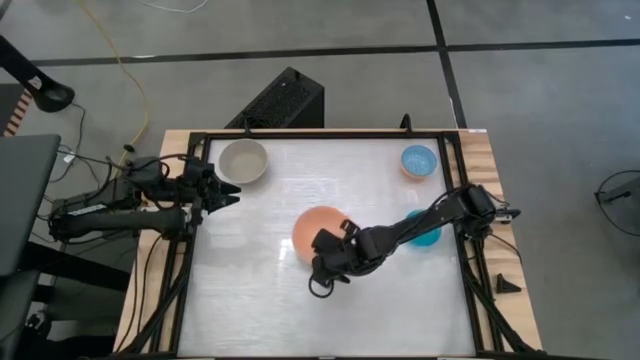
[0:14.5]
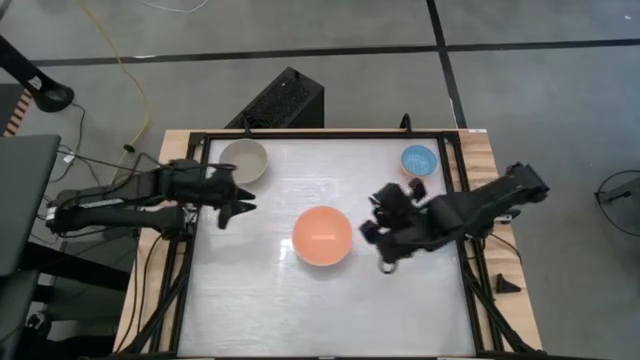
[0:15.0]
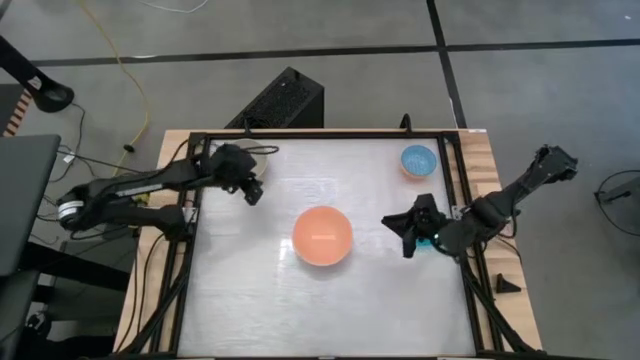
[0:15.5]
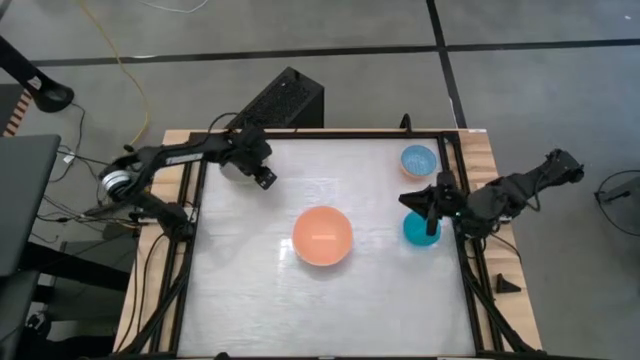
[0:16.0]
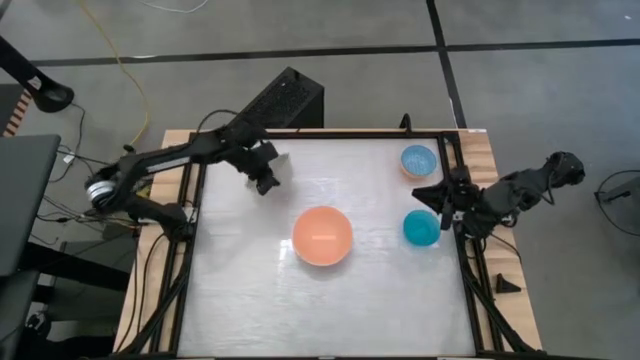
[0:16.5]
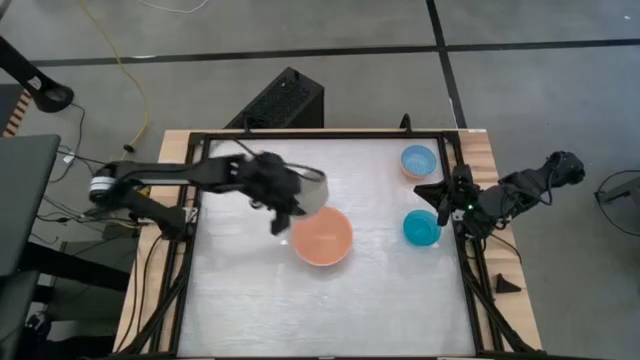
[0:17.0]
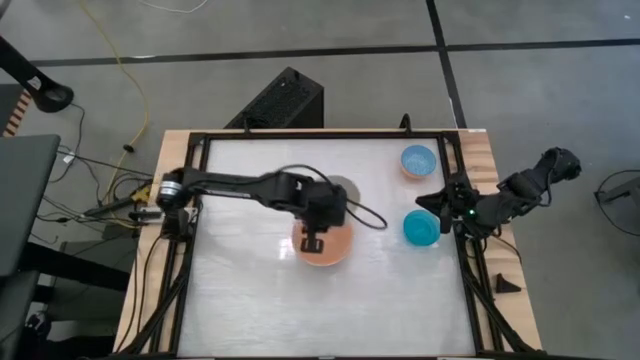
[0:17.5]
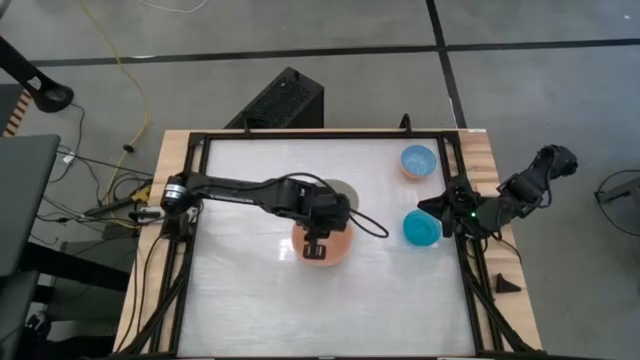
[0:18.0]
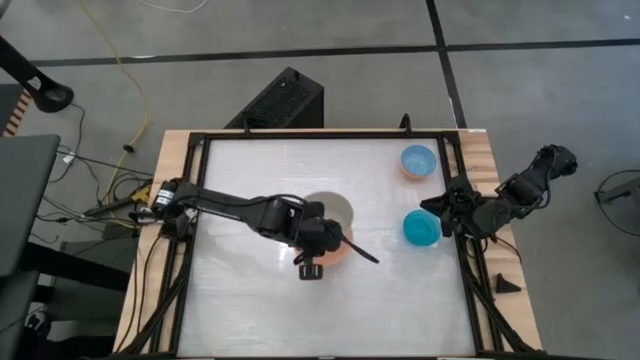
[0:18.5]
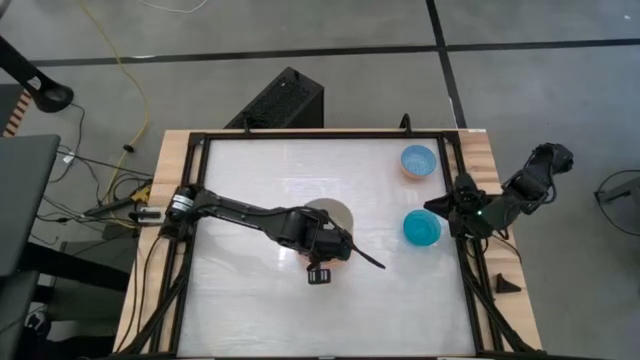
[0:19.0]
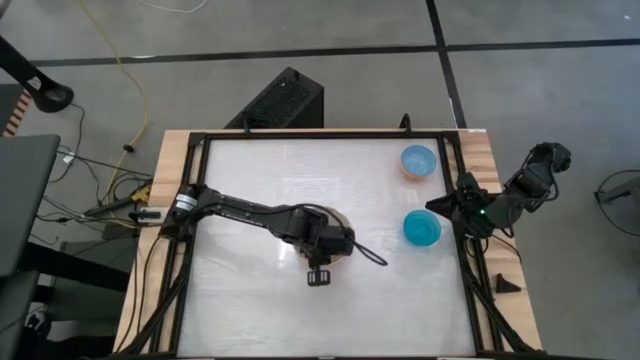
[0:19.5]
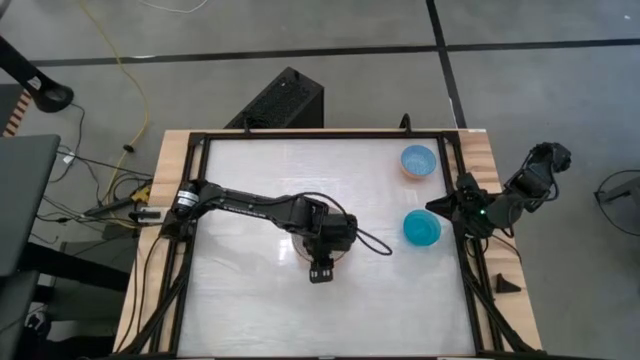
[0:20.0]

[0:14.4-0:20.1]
Stack the gray bowl on top of the orange bowl

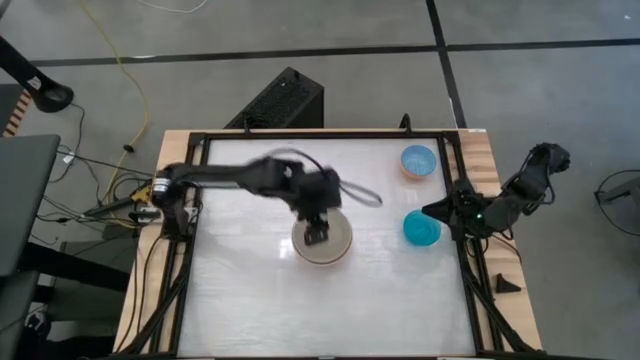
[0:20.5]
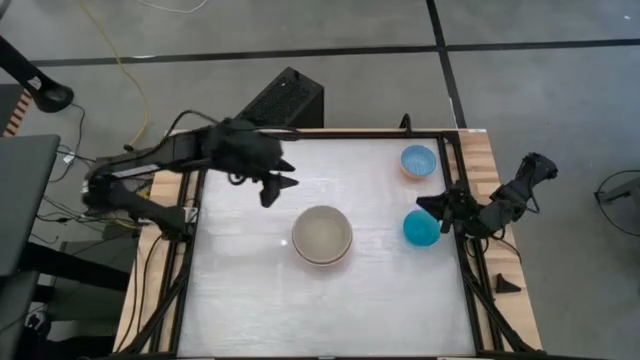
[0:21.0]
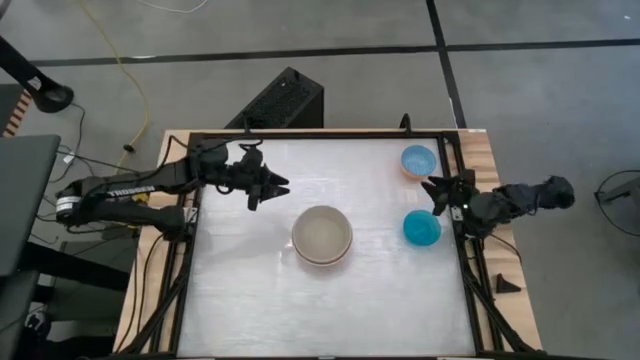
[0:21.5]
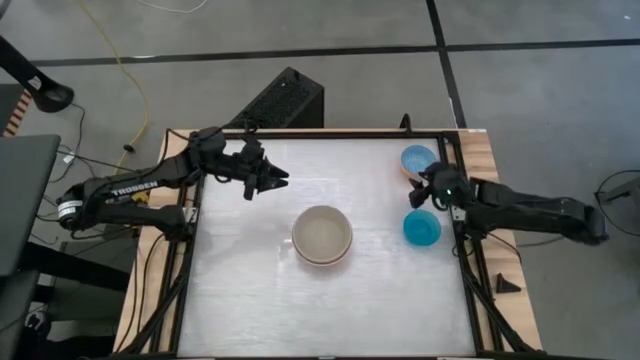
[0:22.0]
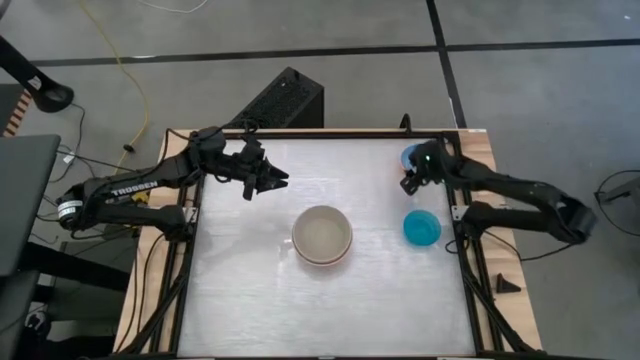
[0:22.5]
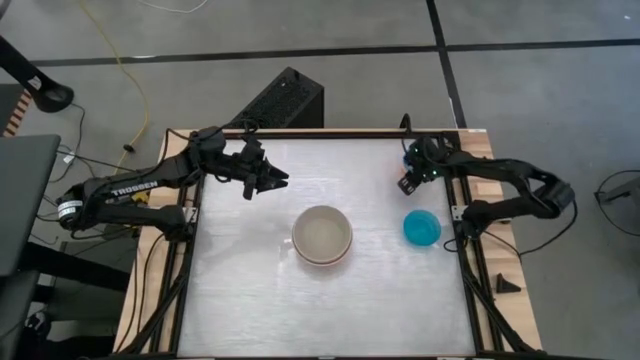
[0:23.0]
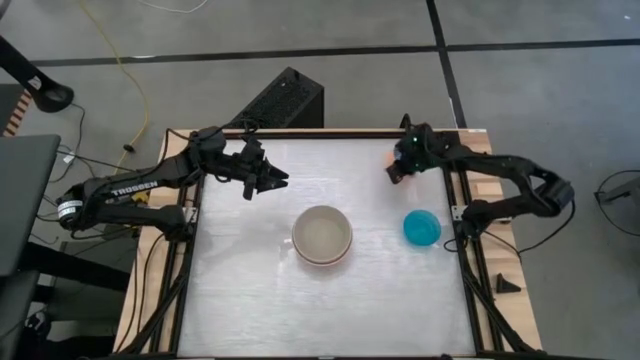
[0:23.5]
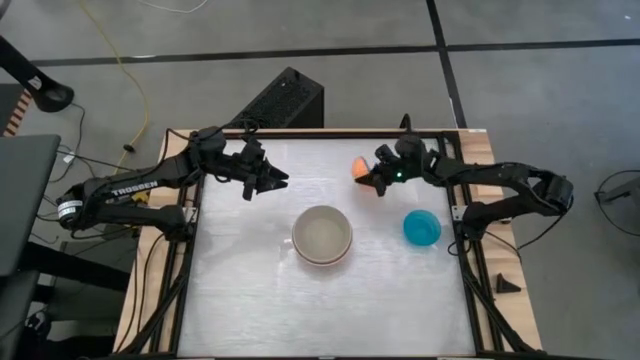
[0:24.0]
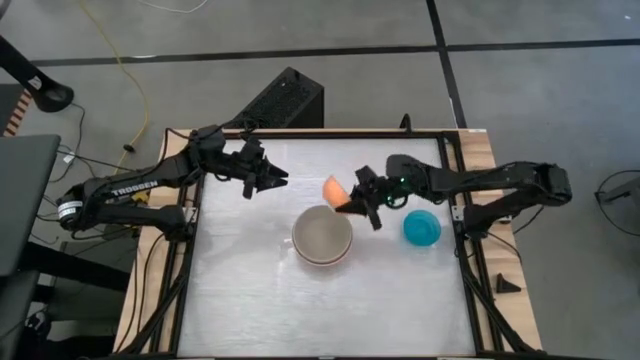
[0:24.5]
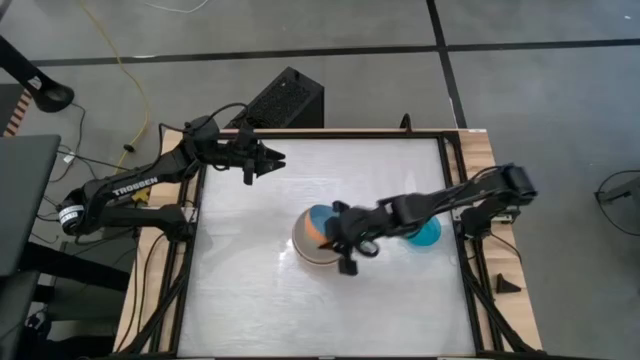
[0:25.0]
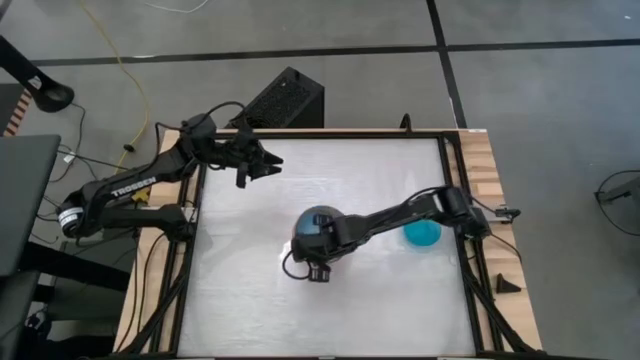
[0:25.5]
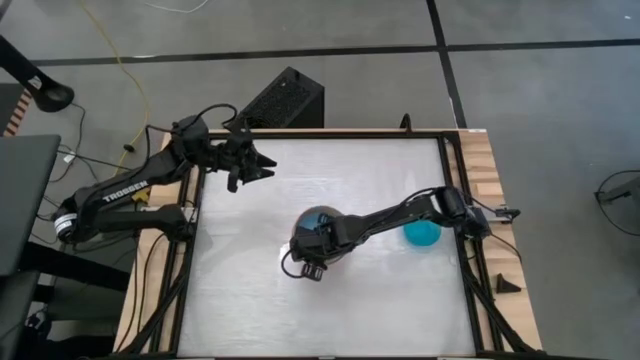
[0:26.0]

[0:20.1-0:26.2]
Stack the blue patterned bowl on top of the gray bowl

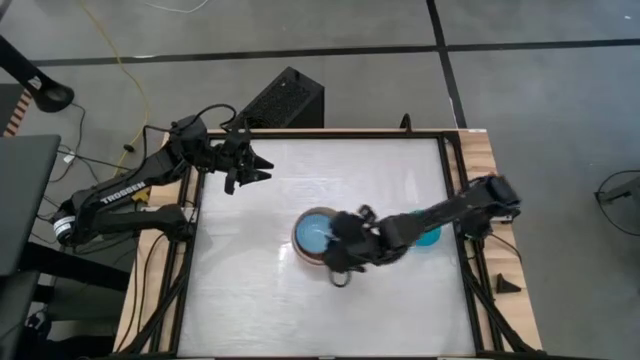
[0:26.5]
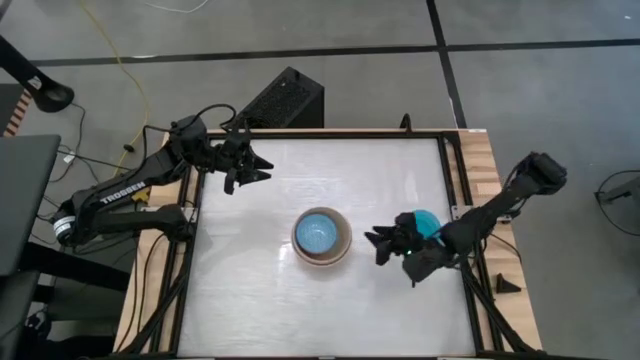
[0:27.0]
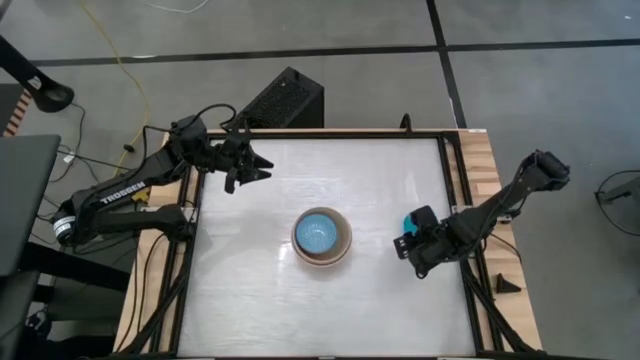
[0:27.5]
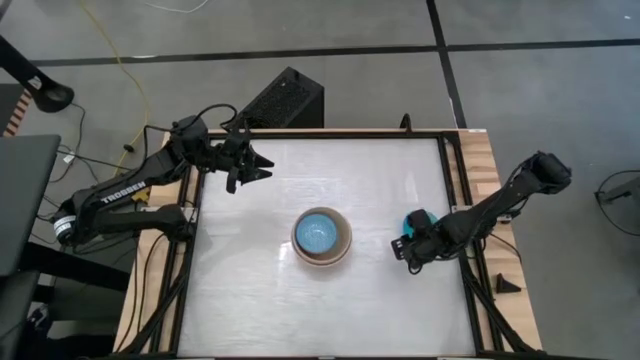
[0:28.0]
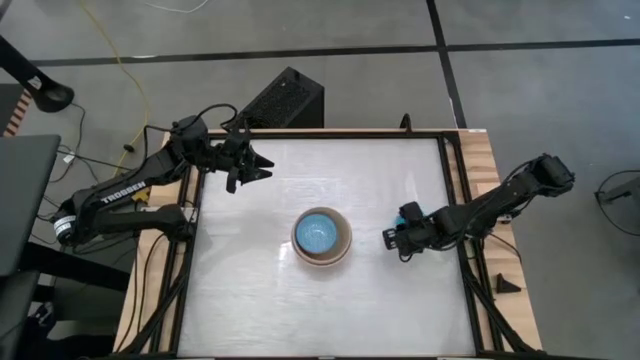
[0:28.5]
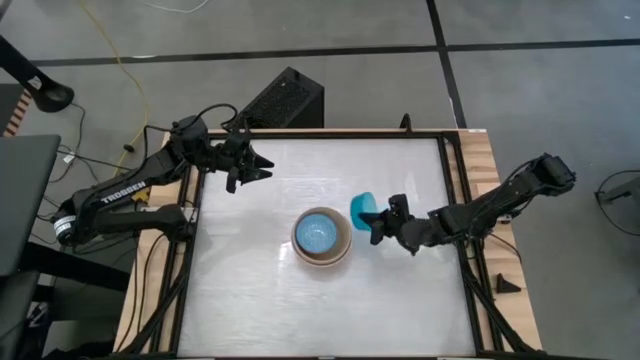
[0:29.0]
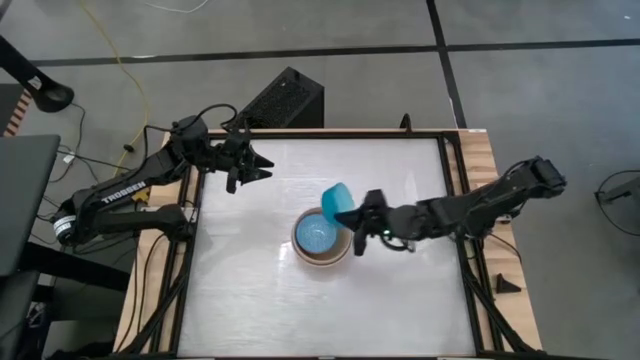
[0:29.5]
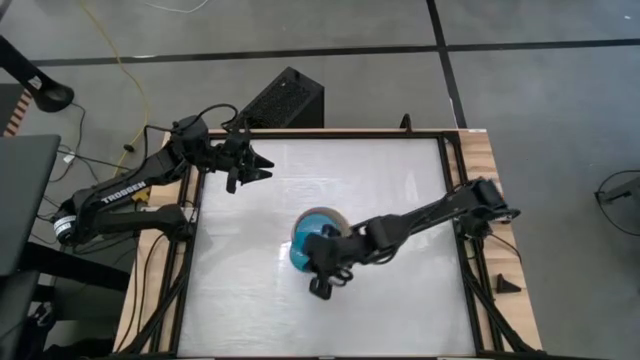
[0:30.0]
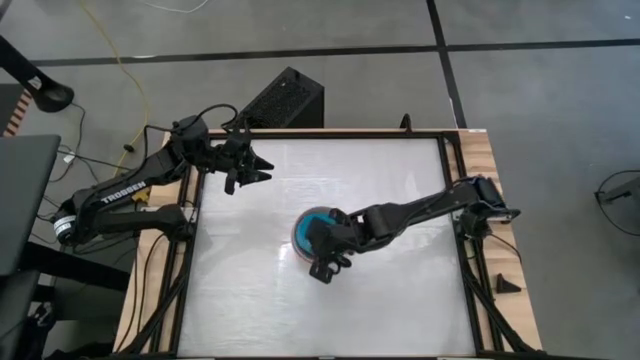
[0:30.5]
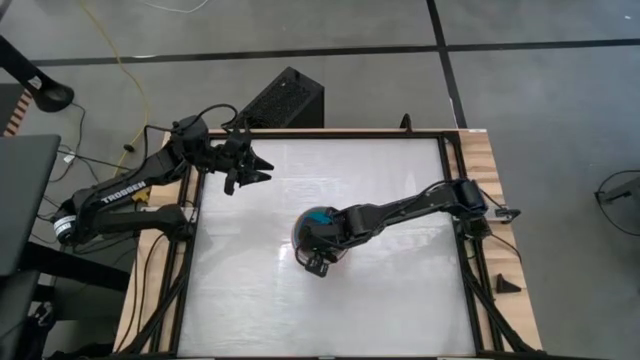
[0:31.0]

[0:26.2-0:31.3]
Stack the light blue plastic bowl on top of the blue patterned bowl

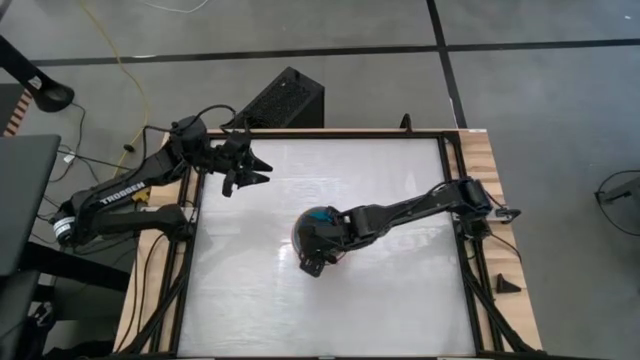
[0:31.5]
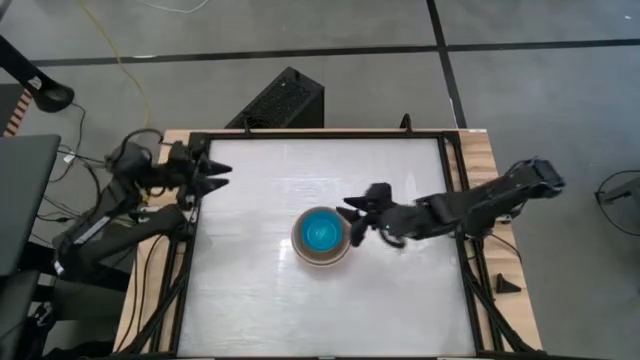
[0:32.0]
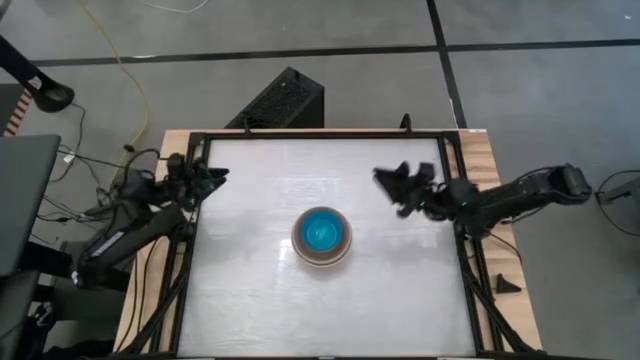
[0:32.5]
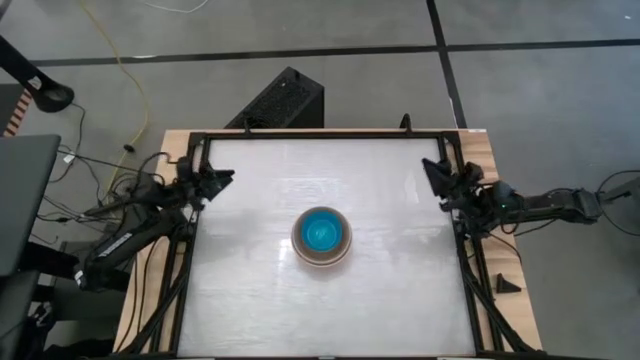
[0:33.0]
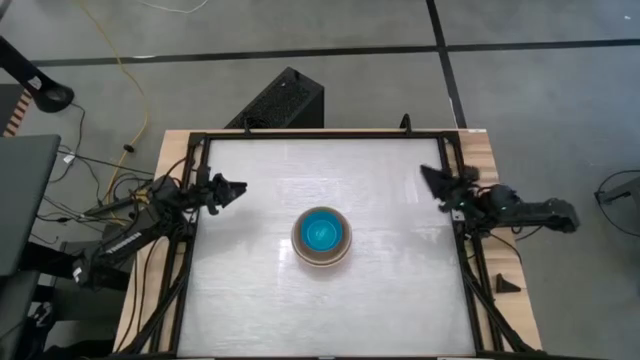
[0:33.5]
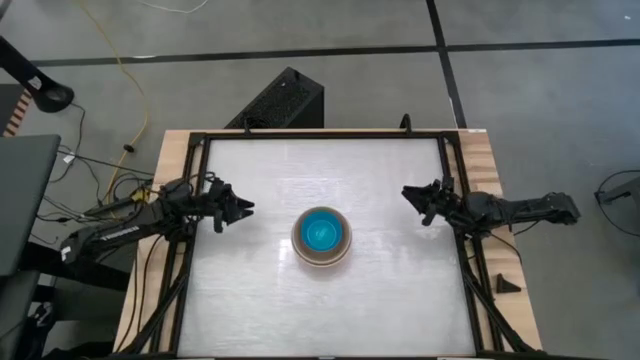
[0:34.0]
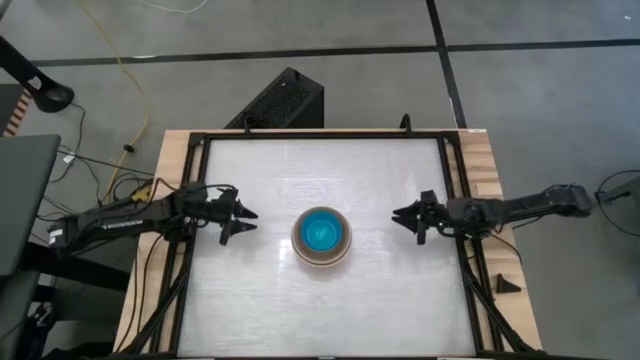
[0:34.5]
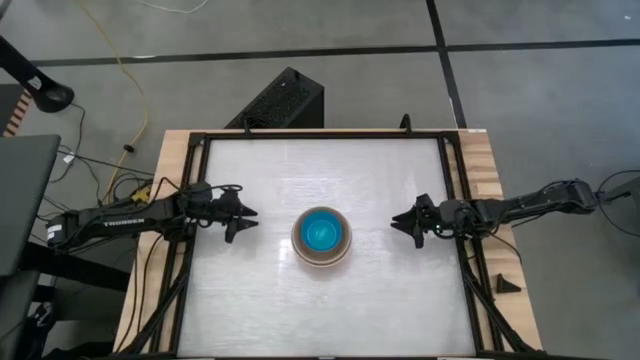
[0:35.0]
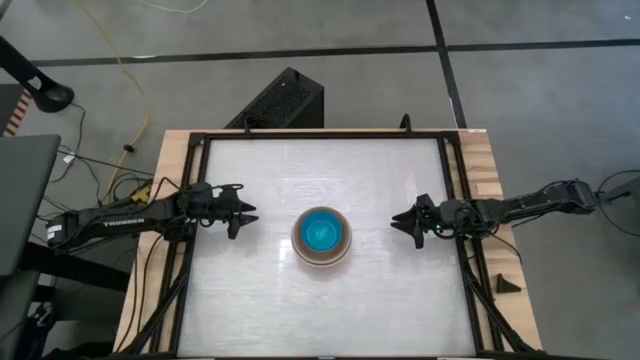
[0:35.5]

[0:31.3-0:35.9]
Return to Home Position
